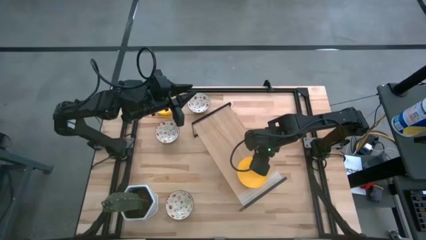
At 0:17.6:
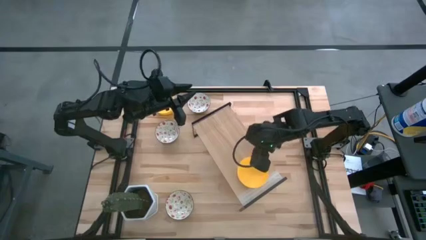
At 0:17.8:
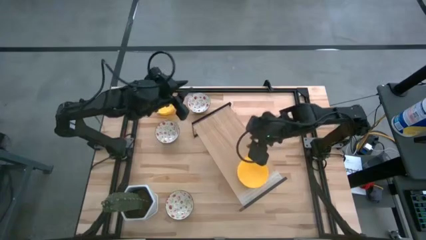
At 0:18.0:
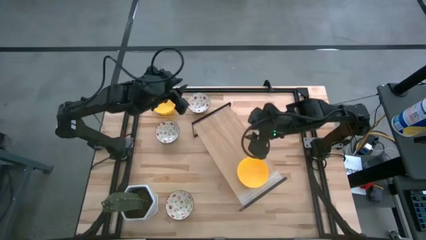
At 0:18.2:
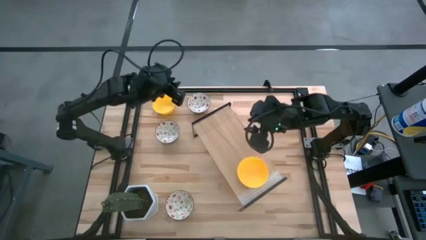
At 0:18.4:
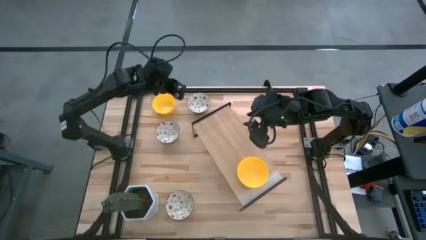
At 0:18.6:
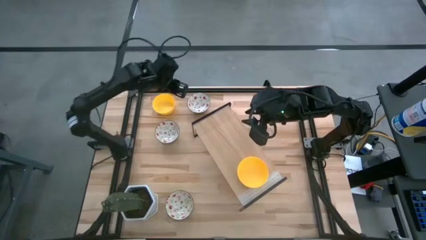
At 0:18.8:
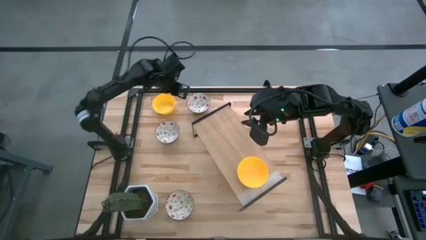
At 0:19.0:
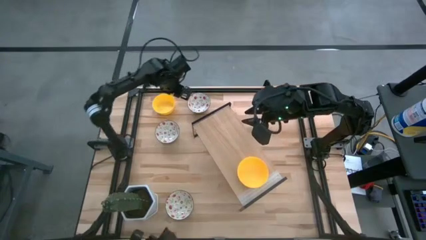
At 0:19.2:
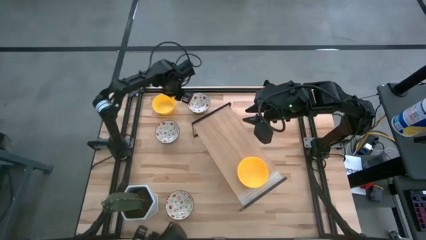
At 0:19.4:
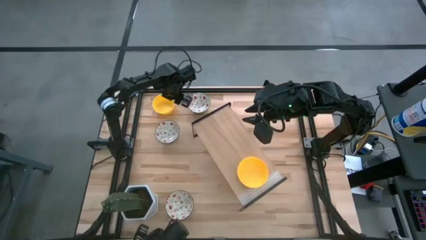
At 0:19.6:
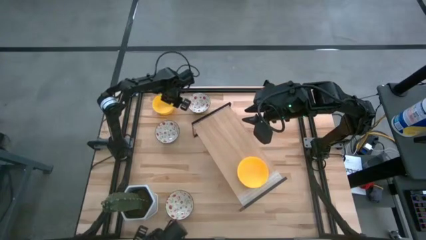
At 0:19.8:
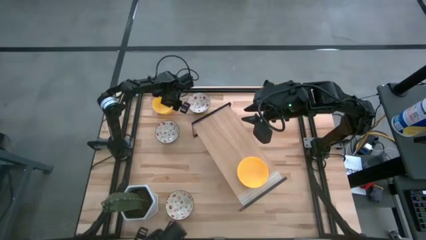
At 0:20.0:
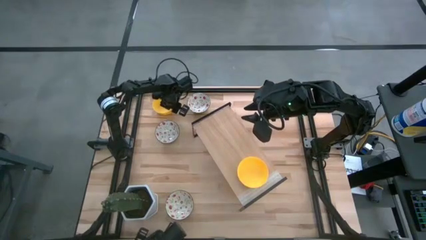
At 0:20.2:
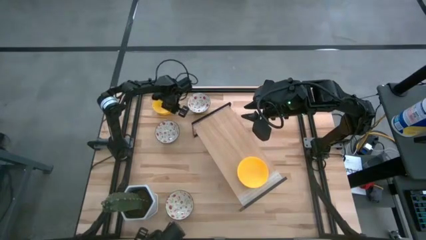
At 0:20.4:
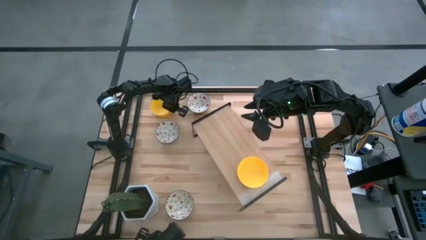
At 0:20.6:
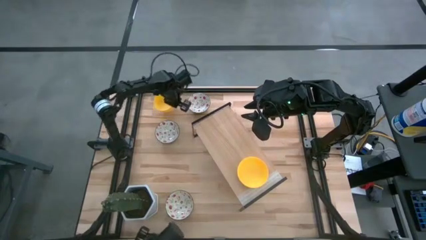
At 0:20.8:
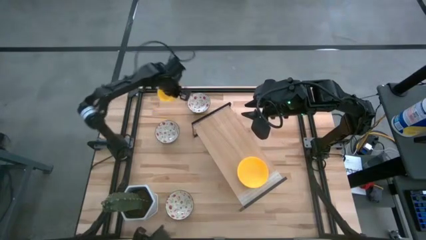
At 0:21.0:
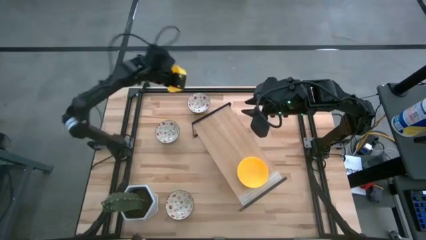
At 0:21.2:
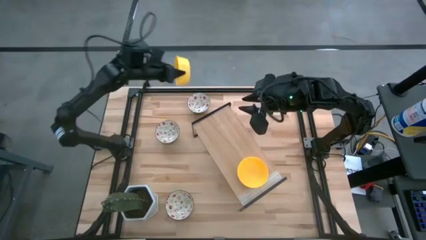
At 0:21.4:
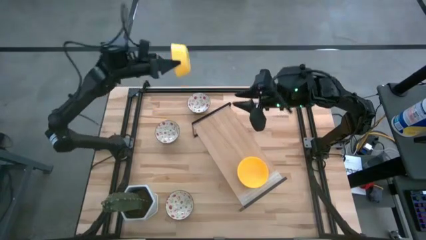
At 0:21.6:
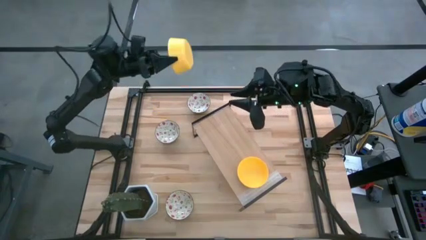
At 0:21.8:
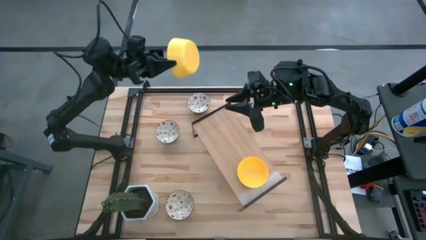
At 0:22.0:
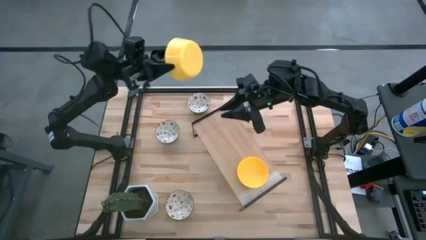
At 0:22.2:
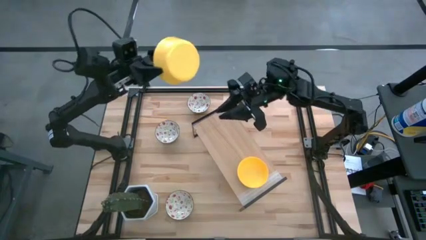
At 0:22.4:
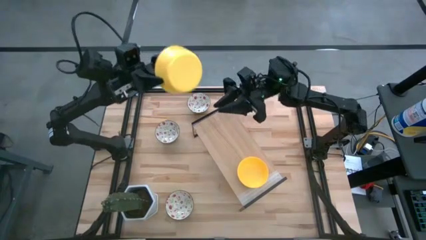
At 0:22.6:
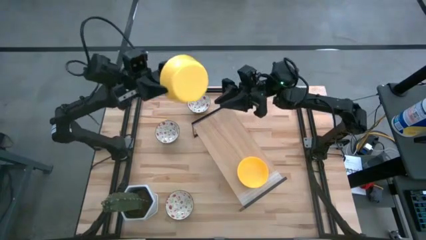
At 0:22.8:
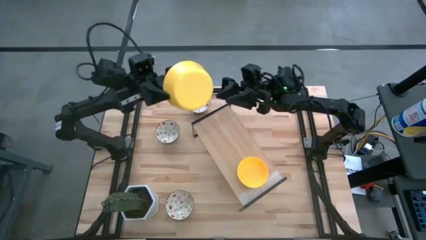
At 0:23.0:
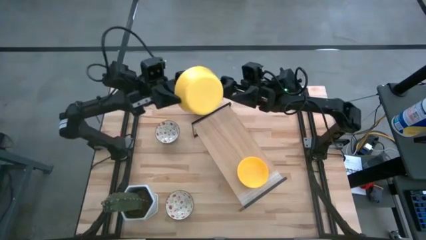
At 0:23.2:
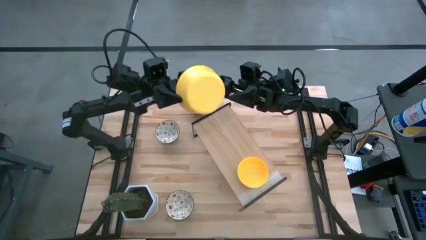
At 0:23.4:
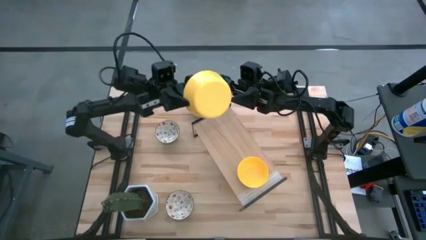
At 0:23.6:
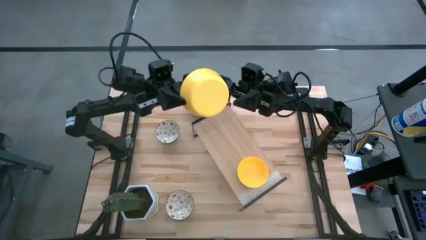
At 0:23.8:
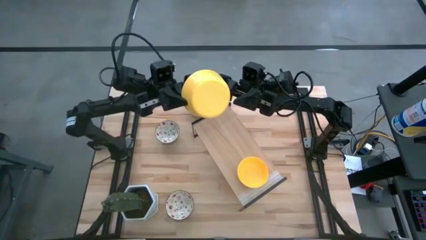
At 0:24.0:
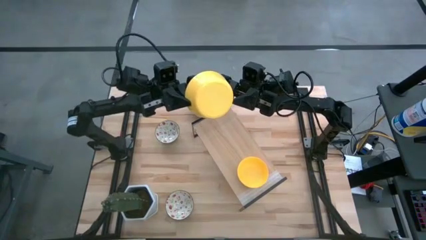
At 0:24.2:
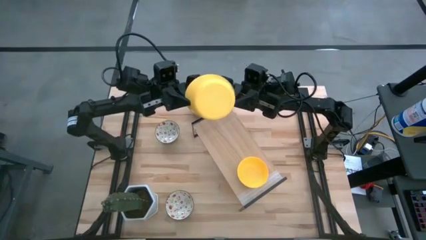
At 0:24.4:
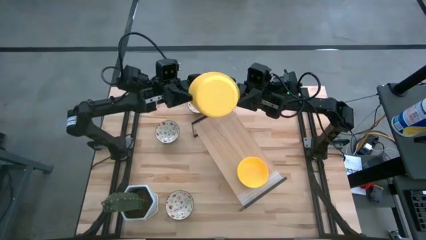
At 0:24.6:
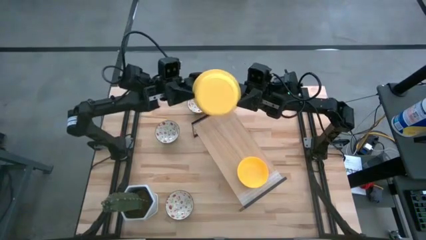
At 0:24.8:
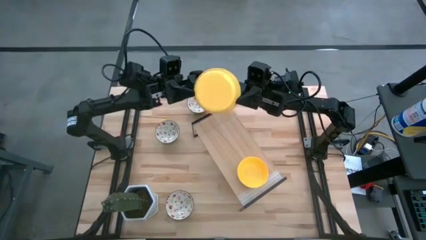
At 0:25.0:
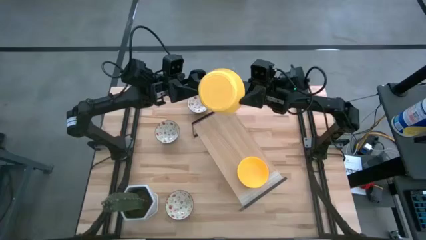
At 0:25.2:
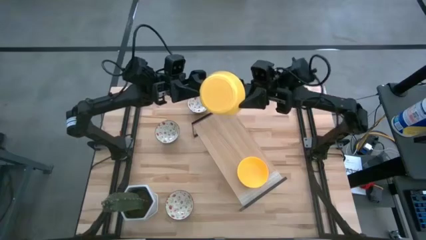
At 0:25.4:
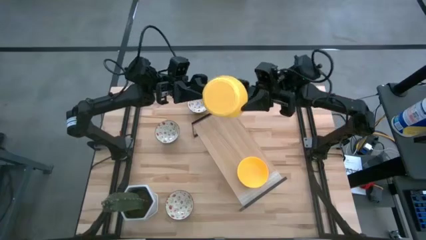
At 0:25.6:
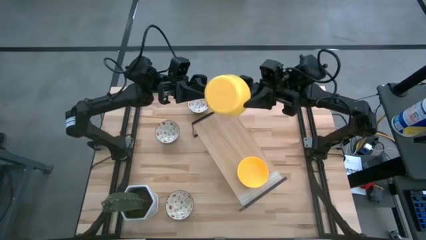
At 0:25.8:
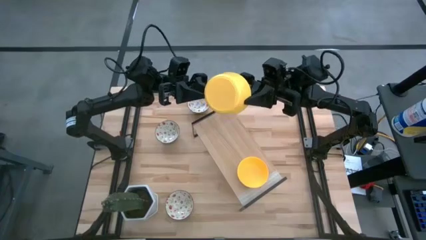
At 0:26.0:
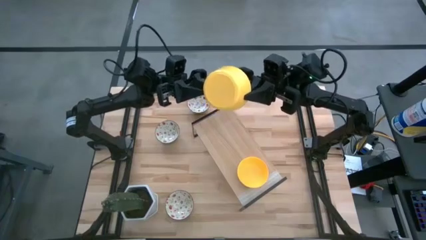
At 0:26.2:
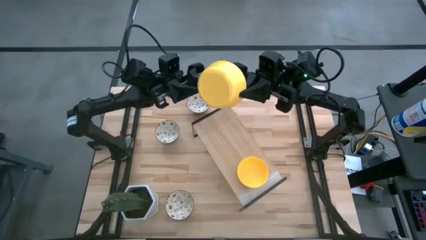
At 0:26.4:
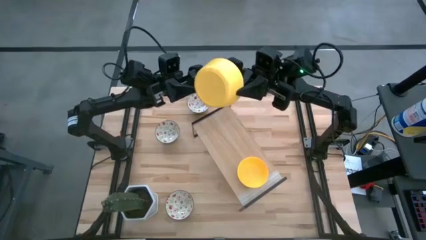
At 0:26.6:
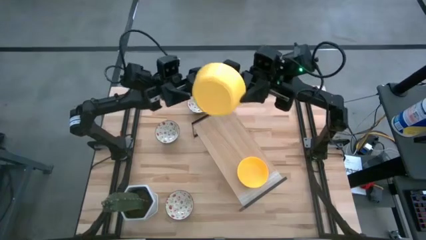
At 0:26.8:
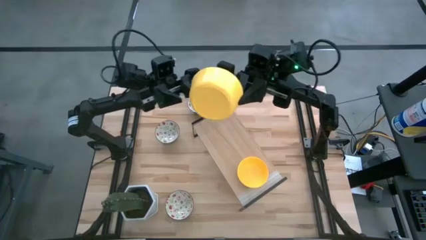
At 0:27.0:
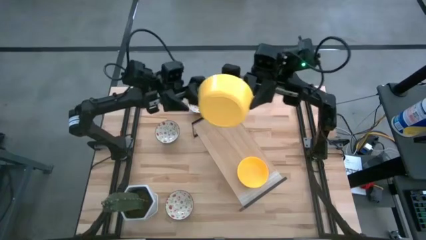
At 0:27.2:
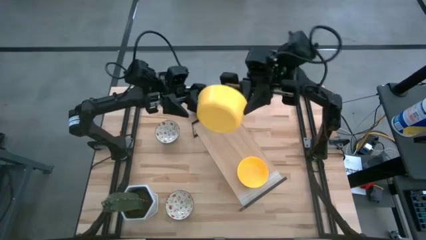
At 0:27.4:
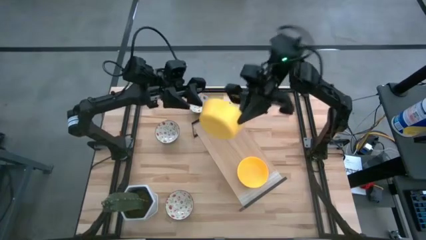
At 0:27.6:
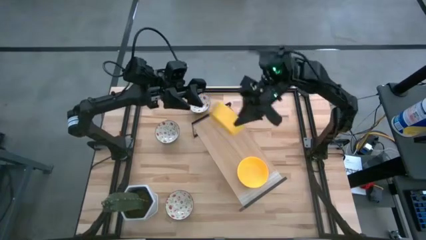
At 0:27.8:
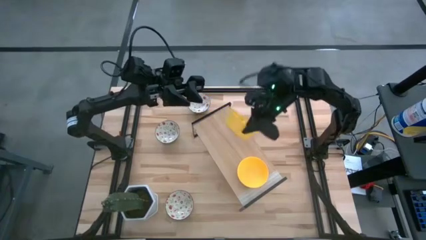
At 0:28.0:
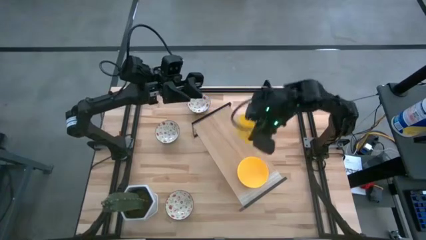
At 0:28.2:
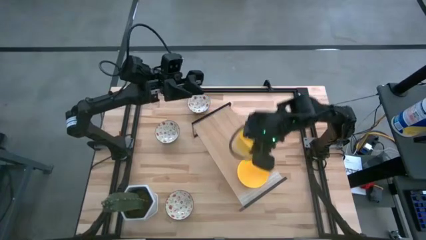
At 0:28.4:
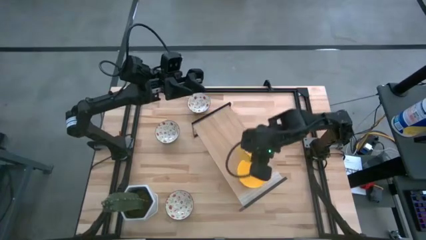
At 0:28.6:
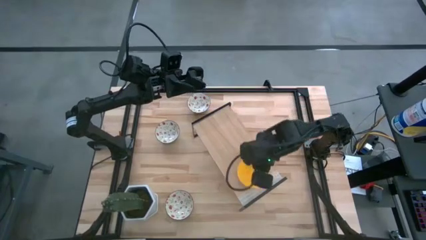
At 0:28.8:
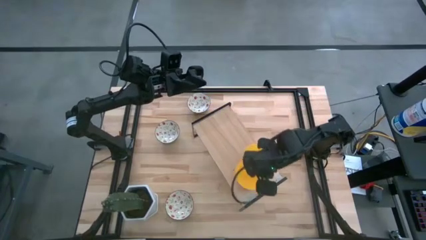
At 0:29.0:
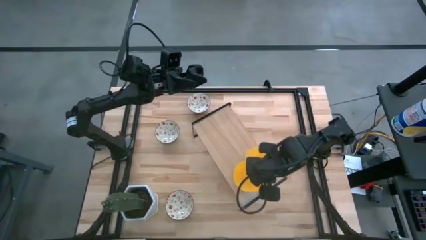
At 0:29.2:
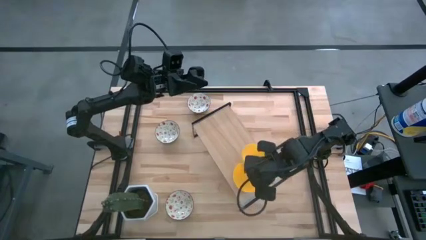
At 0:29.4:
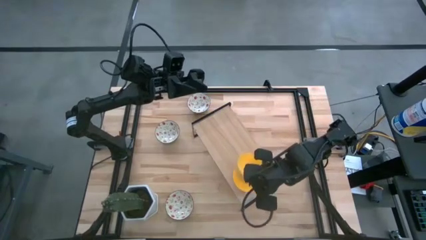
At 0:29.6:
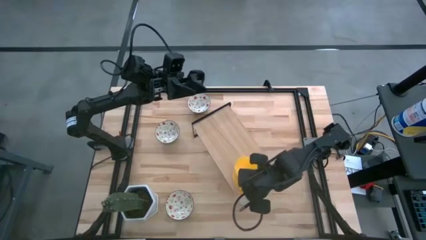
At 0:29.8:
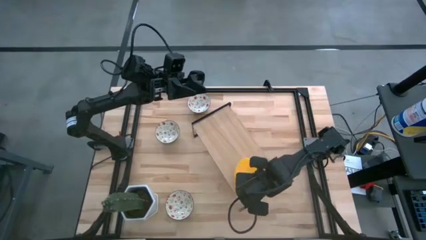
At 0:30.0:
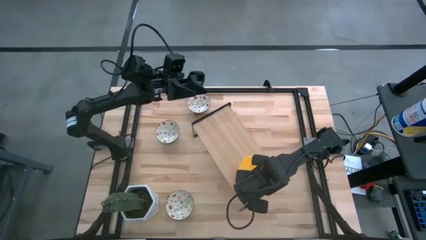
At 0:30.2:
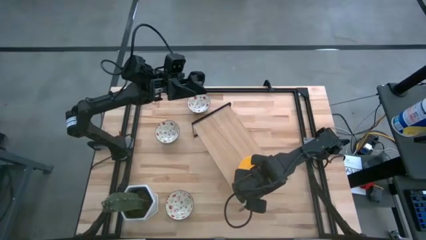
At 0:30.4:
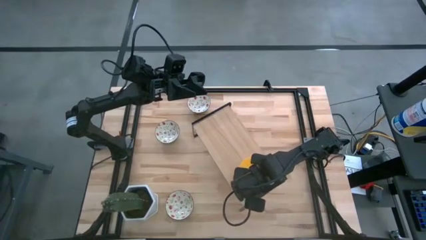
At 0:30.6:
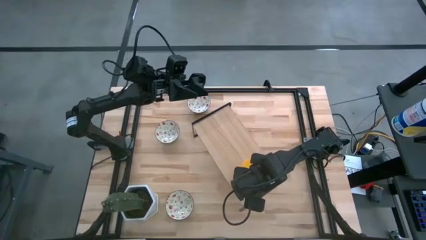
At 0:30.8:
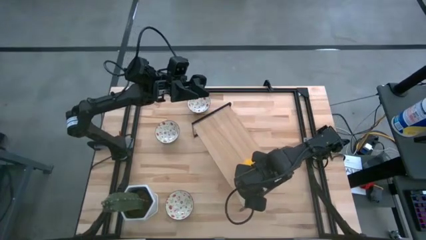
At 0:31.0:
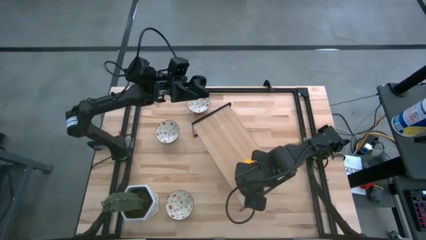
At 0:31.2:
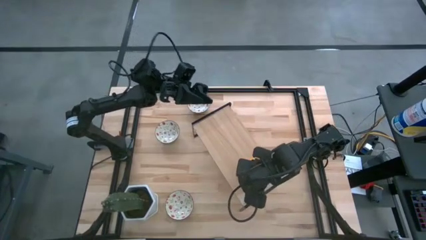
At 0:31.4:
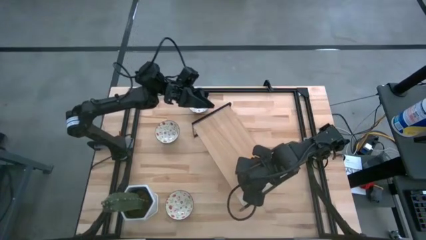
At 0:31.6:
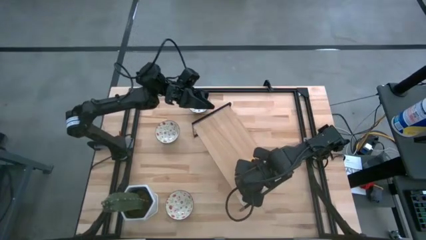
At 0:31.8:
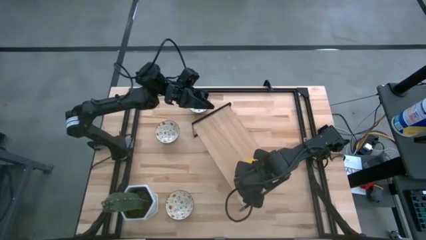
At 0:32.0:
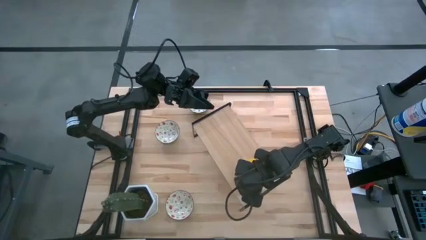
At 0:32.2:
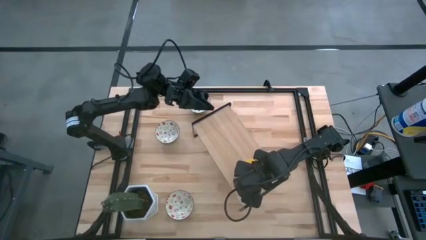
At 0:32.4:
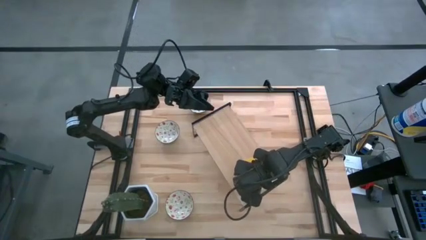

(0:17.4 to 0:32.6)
Task: Pick & Place Mini bowls
Stack the yellow bowl on the yellow bowl on the shelf
